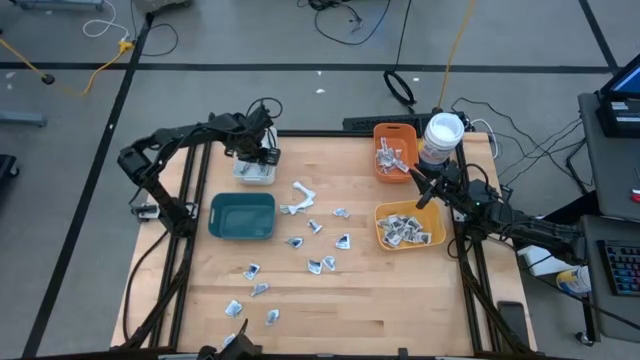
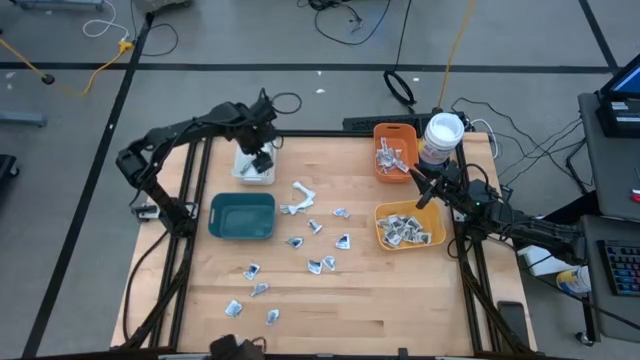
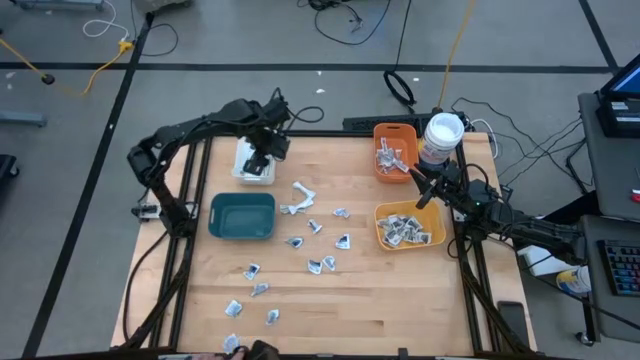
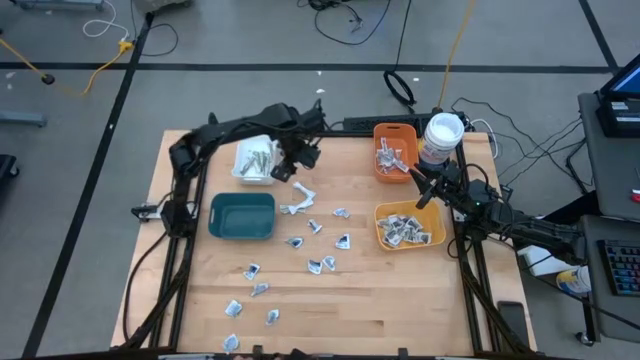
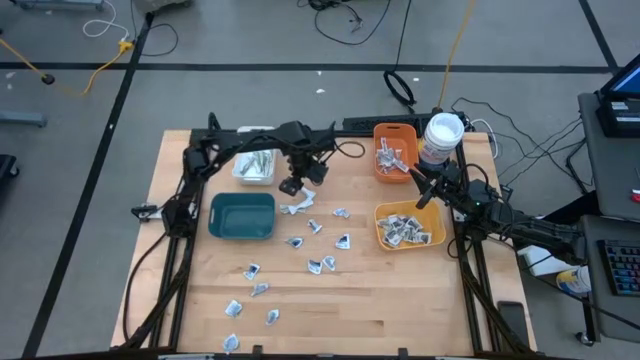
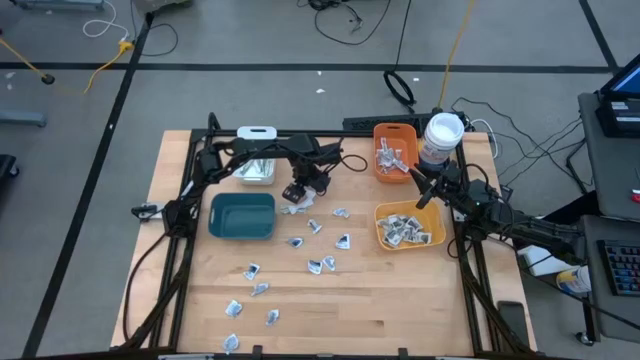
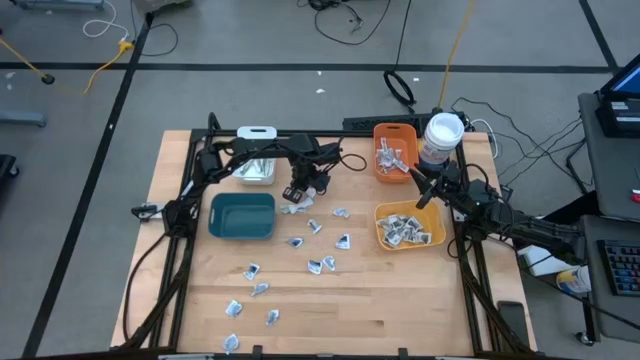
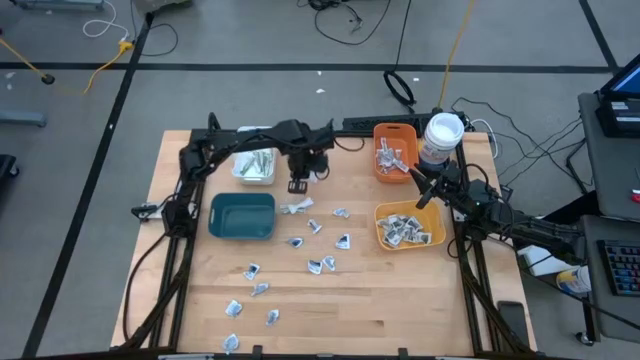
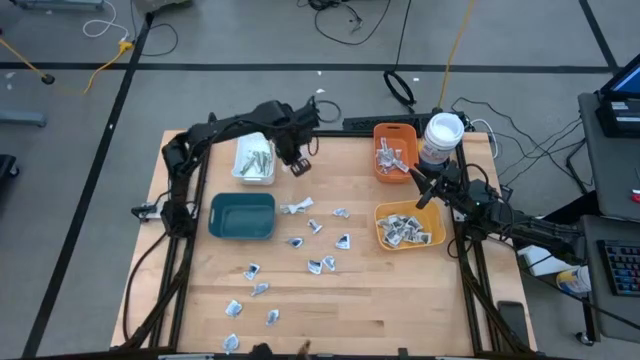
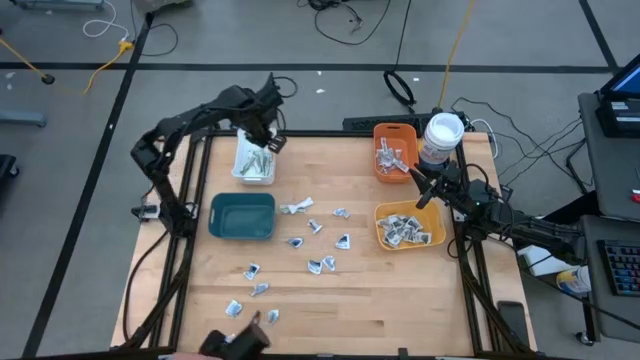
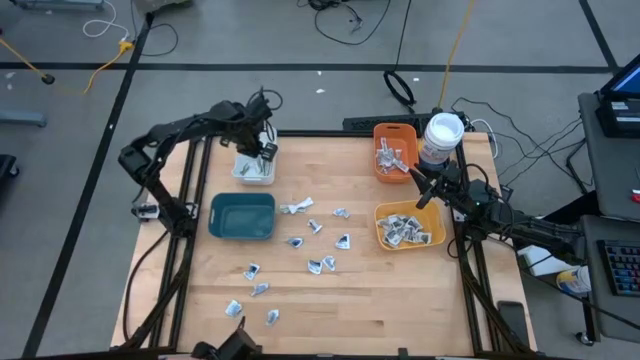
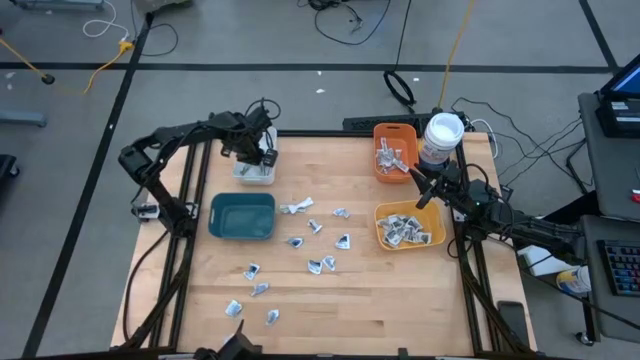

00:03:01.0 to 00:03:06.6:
Task: Pick & Place First Aid Supplies
Put the bandage into the white bin

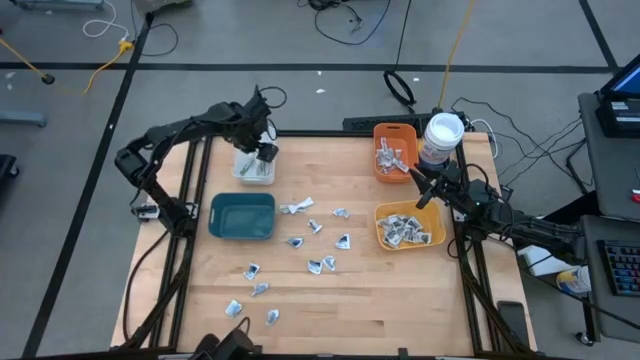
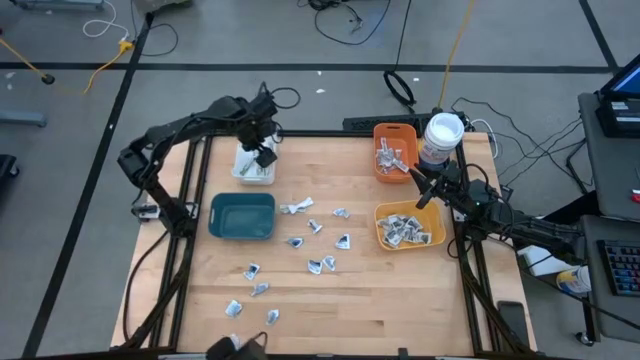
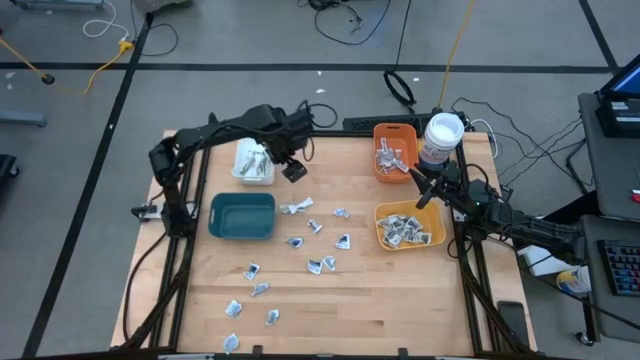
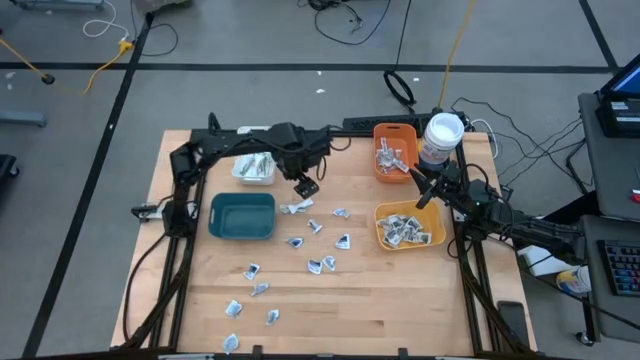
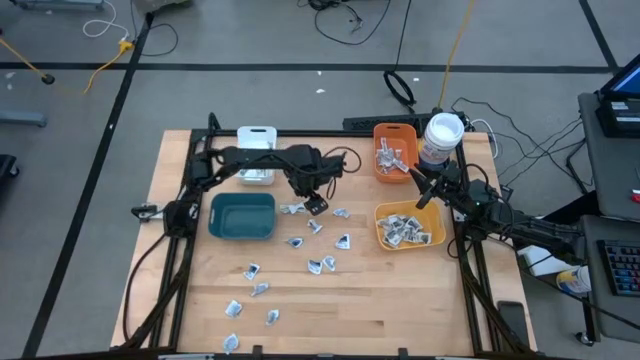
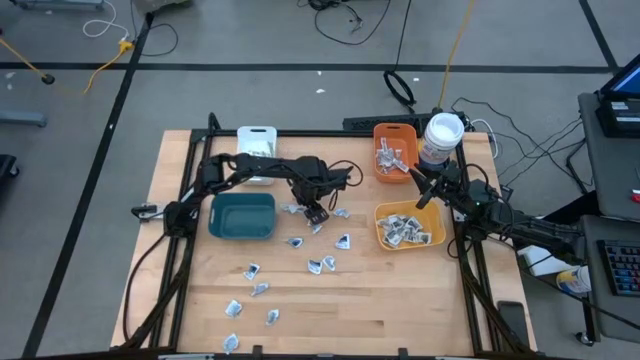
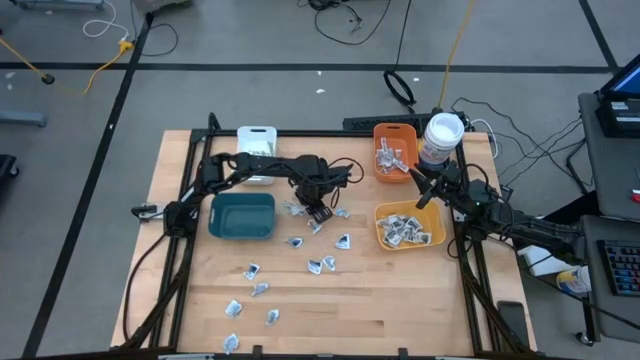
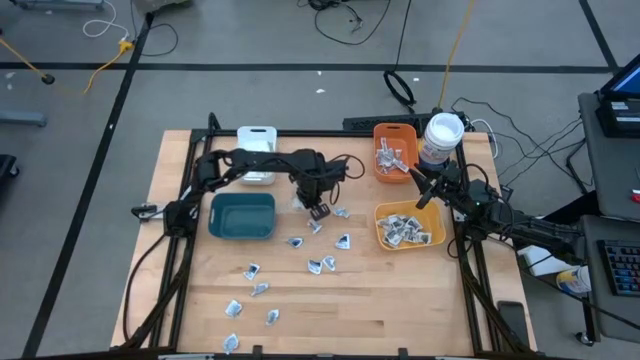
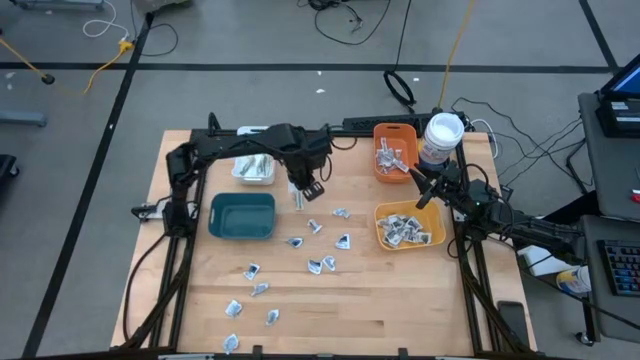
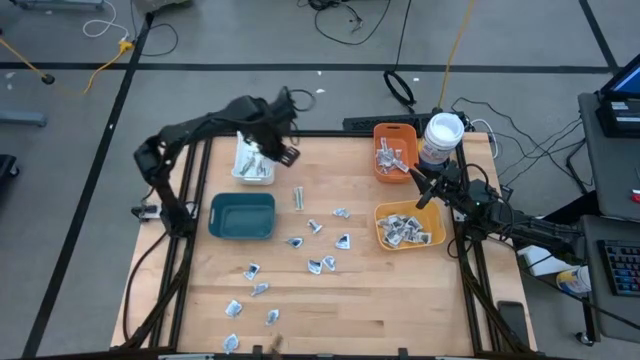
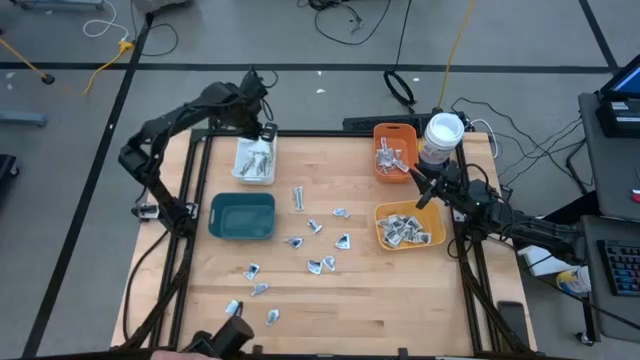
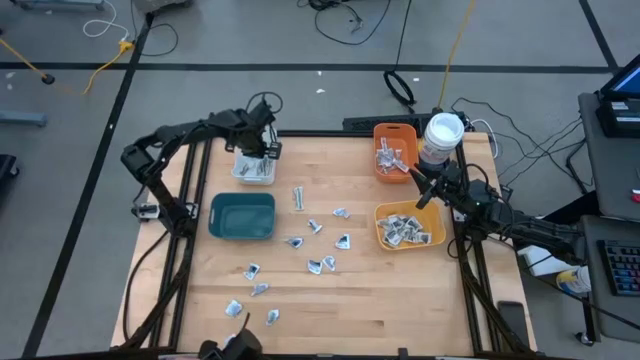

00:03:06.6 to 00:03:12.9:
Put the bandage into the white bin

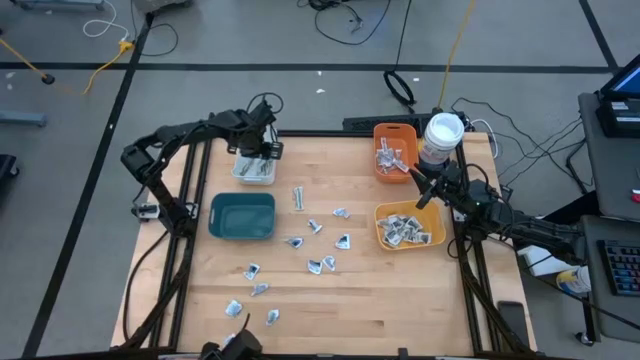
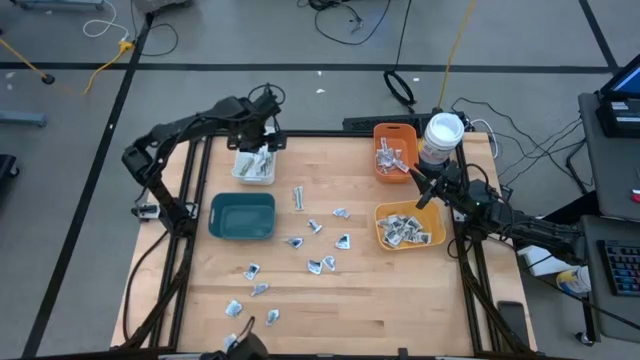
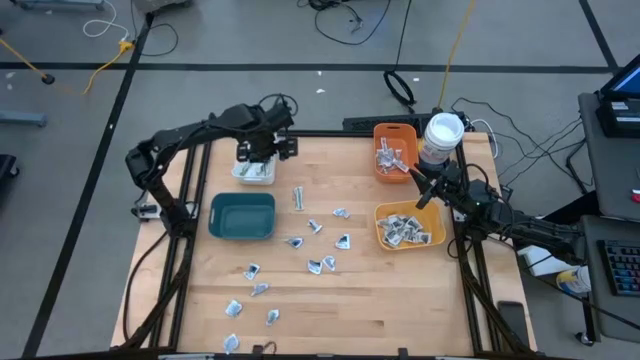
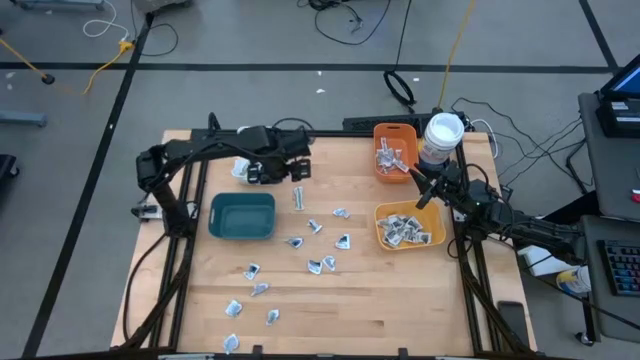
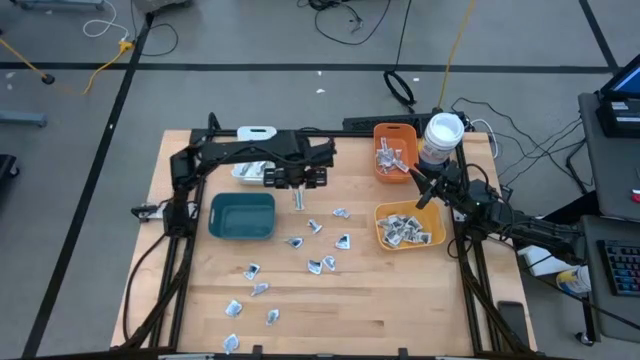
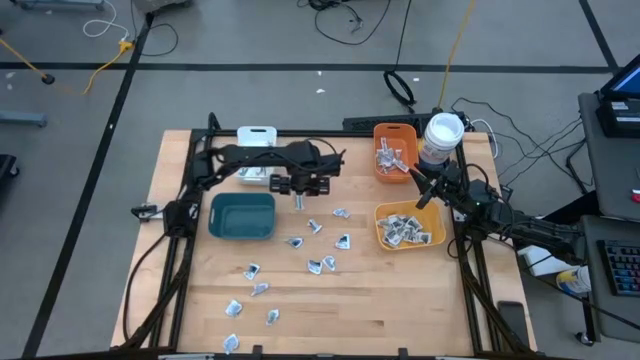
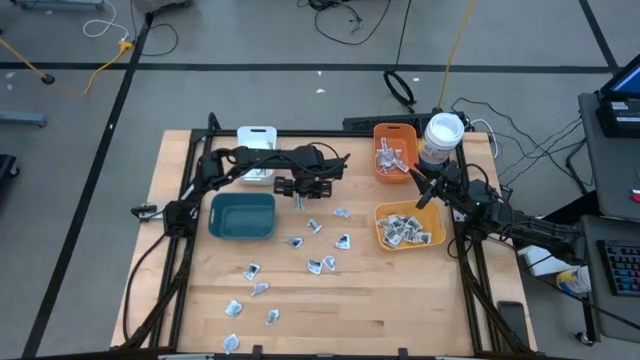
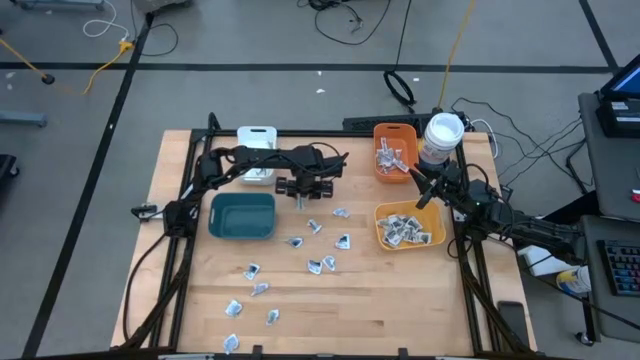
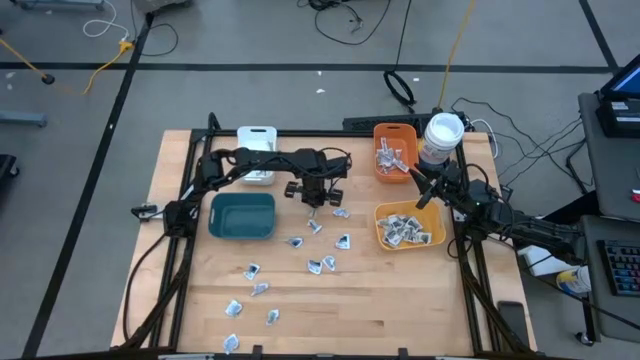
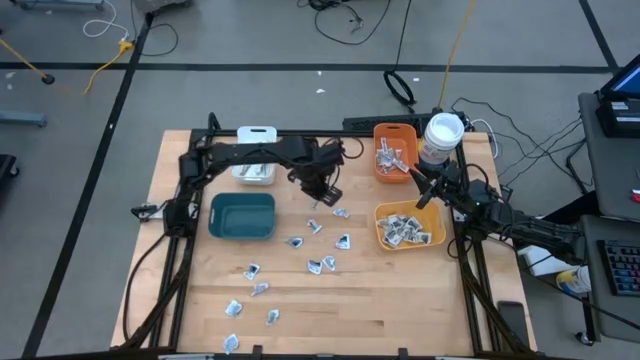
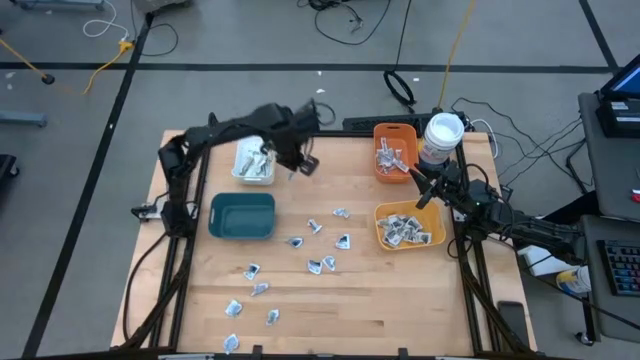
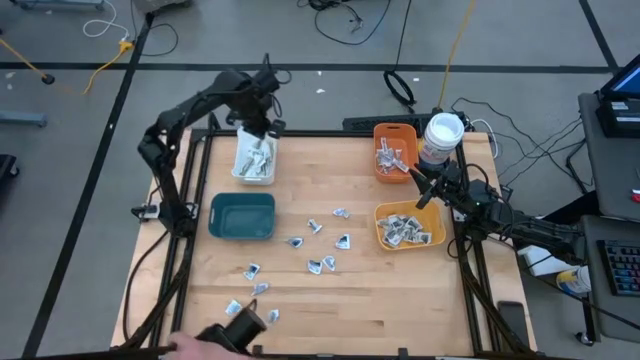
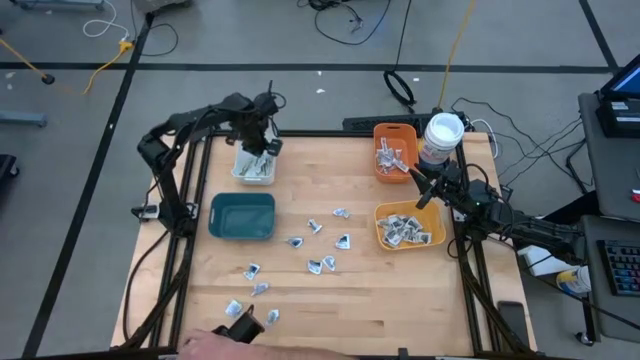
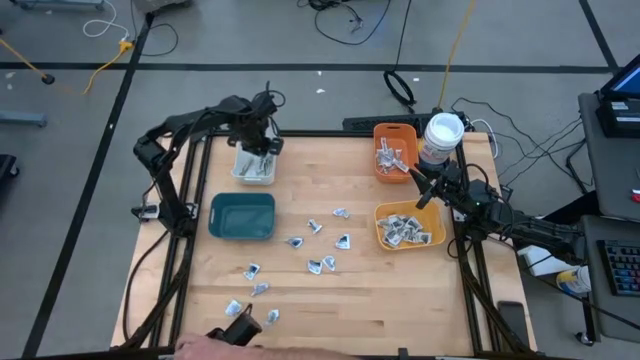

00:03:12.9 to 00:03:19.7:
Put the bandage into the white bin
